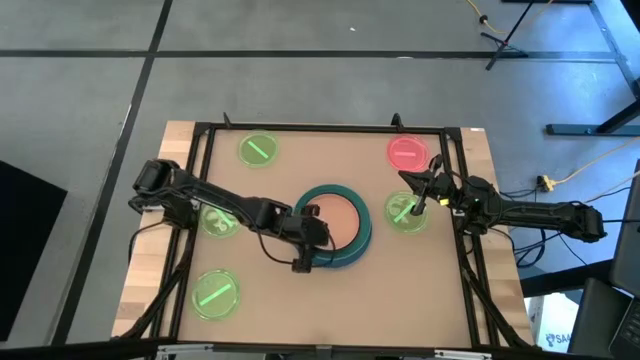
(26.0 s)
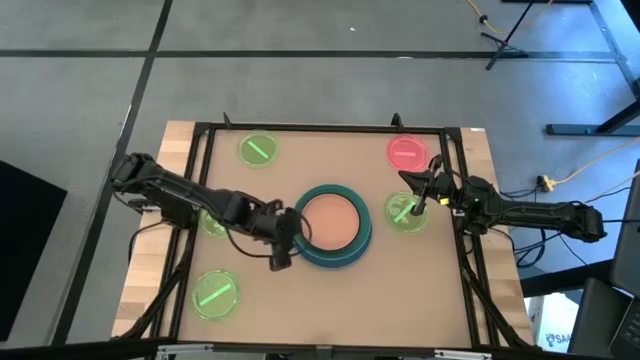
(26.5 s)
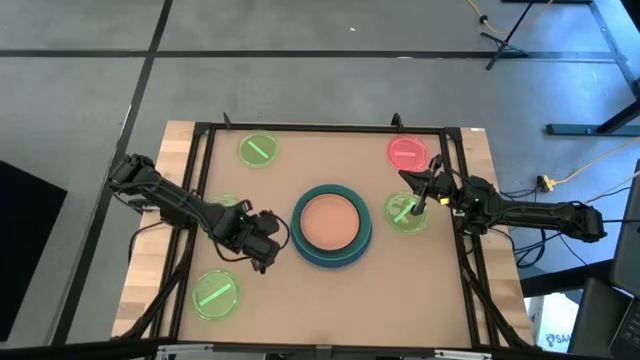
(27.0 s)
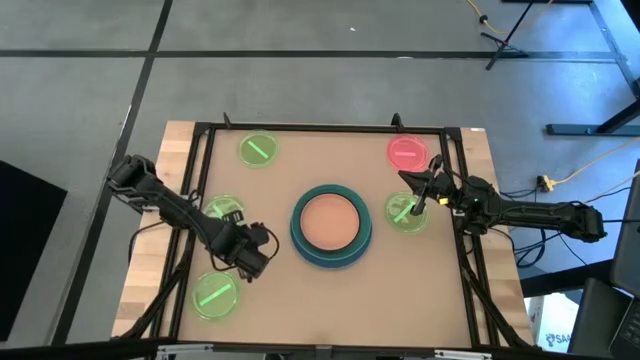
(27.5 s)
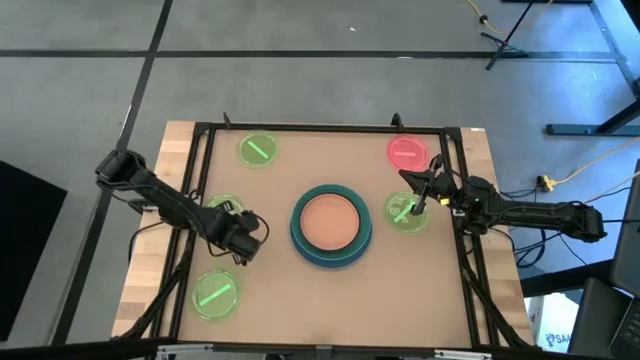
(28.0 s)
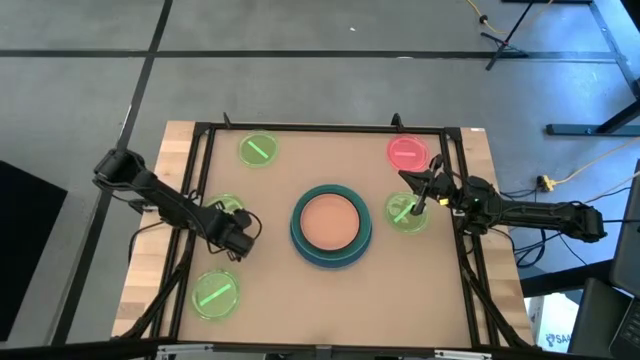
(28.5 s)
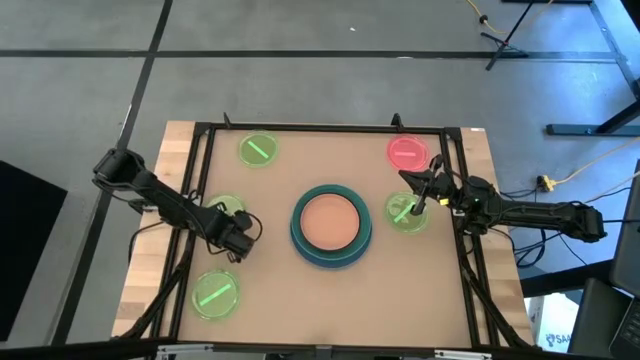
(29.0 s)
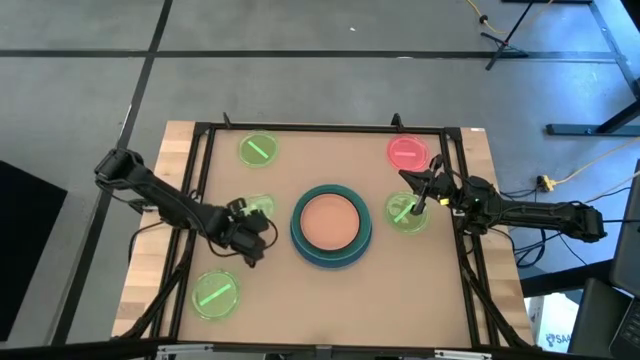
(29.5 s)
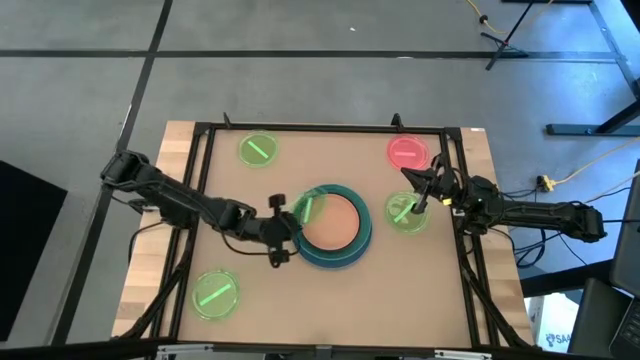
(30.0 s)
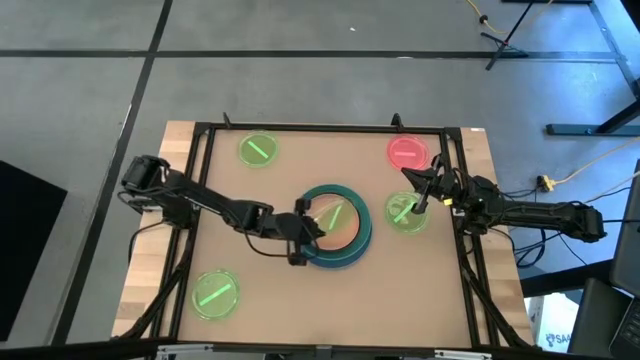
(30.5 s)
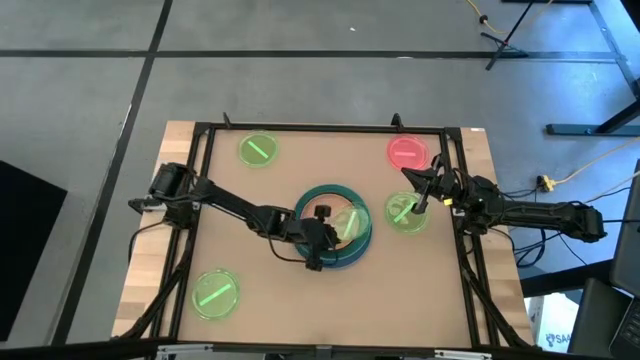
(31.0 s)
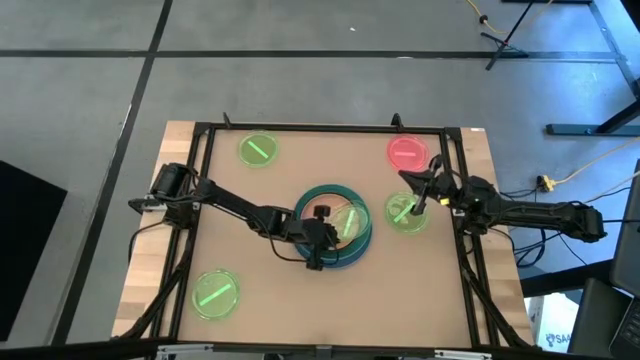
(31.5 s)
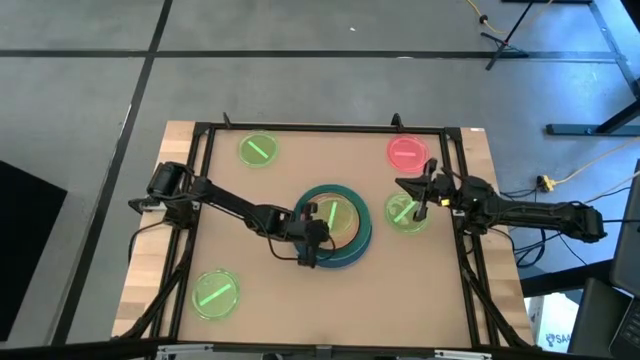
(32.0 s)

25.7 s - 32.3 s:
Task: Stack plastic plates
Stack the light green plate on the orange plate

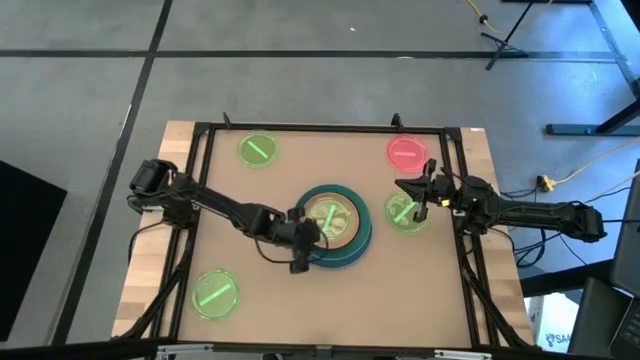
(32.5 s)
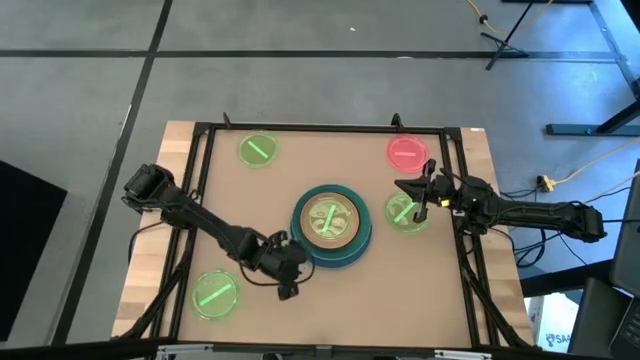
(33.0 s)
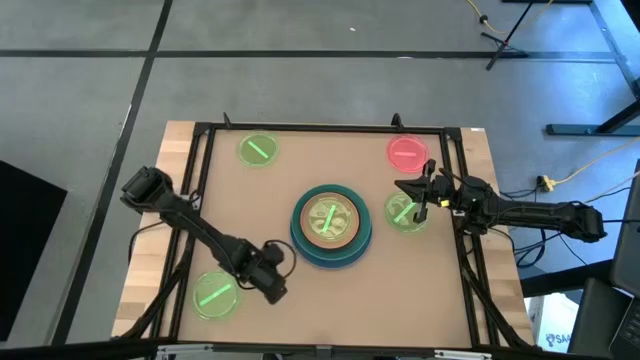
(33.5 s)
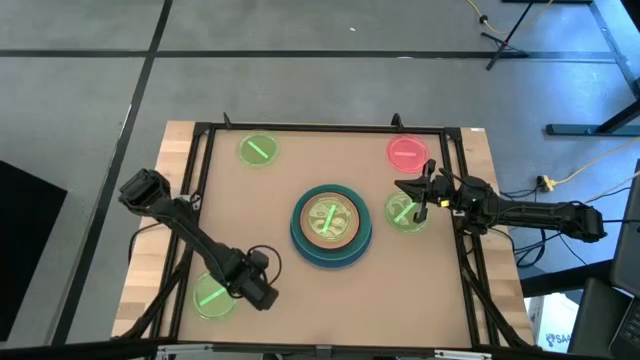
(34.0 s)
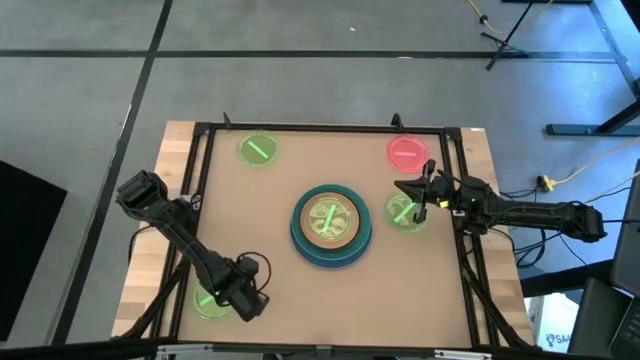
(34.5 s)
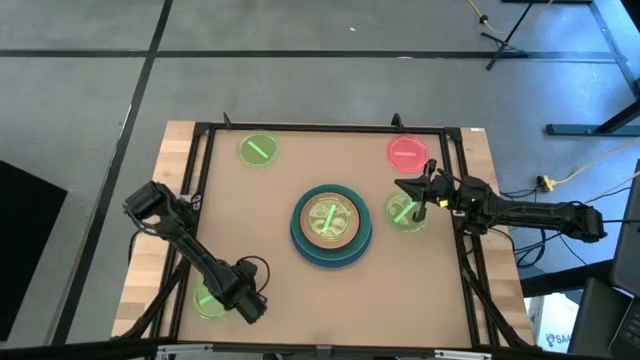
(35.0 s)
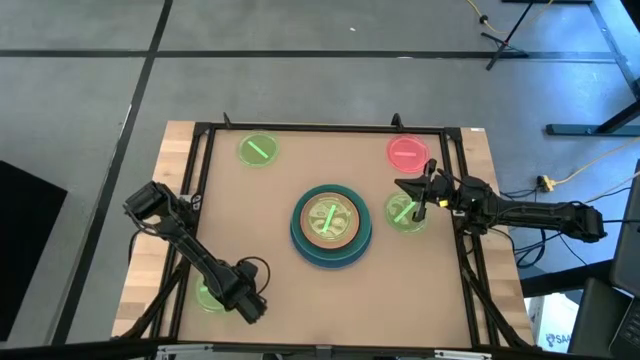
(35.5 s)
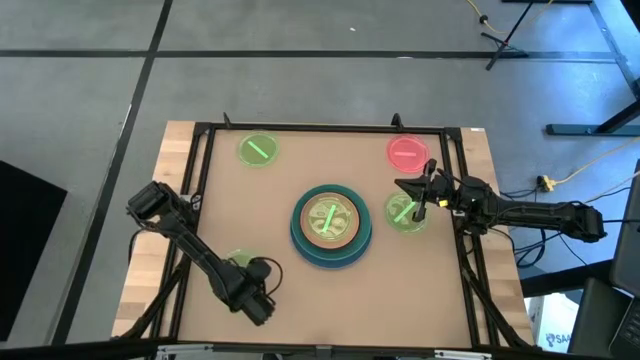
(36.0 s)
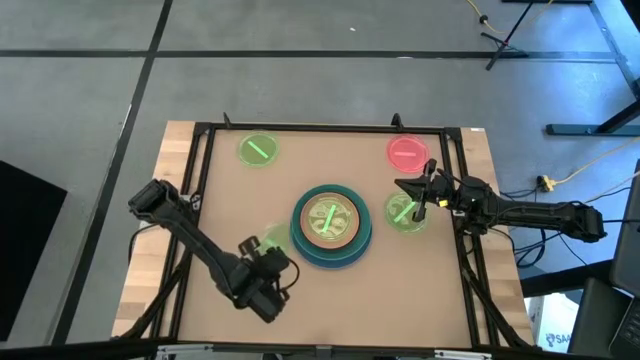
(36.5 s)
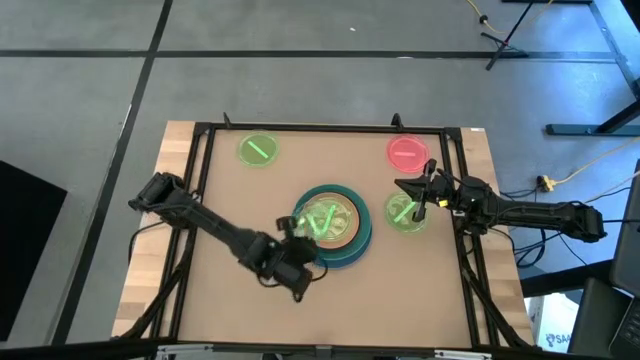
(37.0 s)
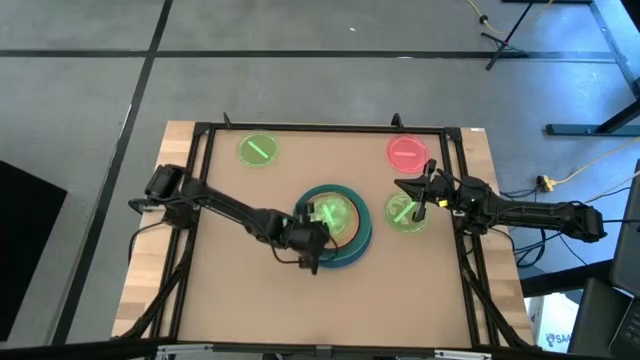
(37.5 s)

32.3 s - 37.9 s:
Stack the light green plate on the light green plate

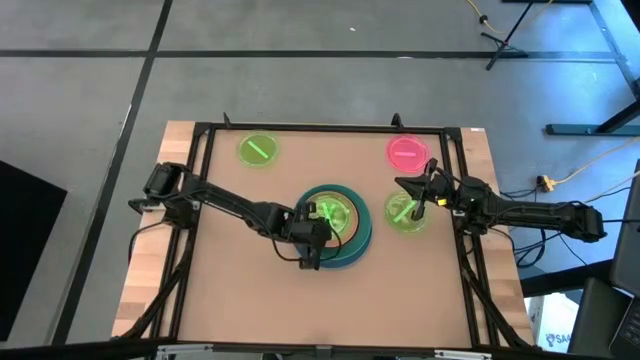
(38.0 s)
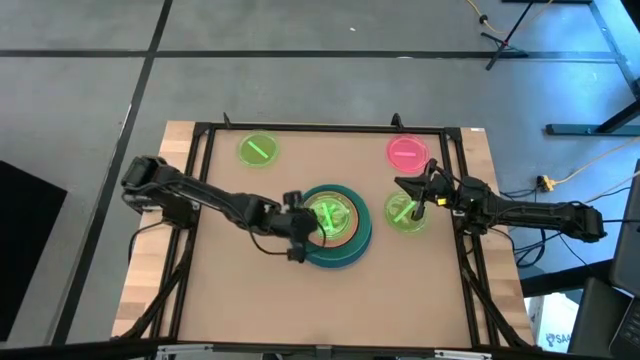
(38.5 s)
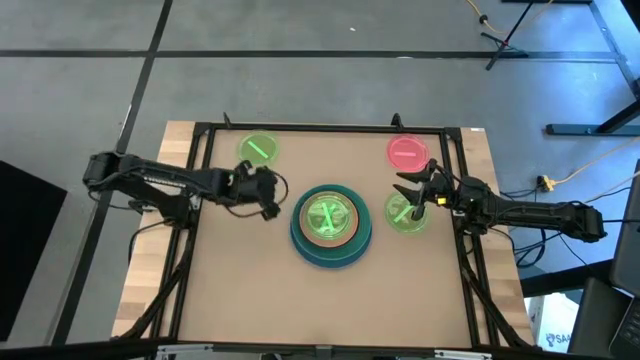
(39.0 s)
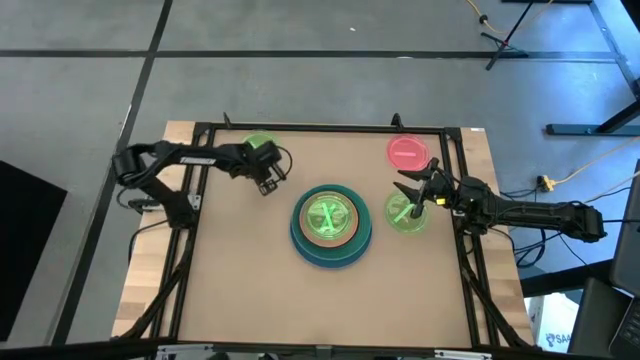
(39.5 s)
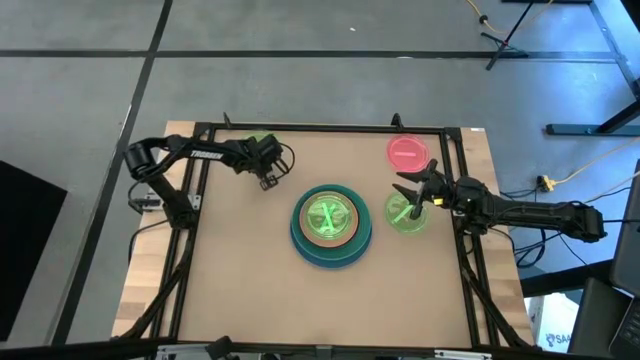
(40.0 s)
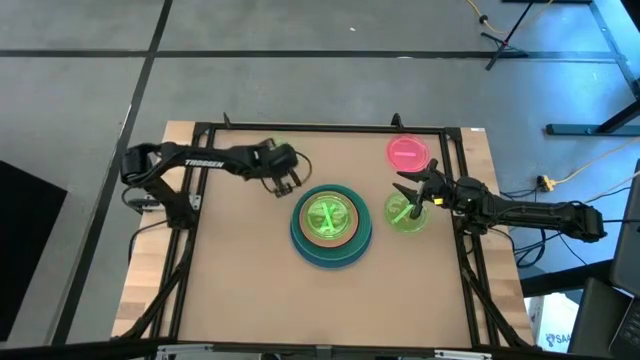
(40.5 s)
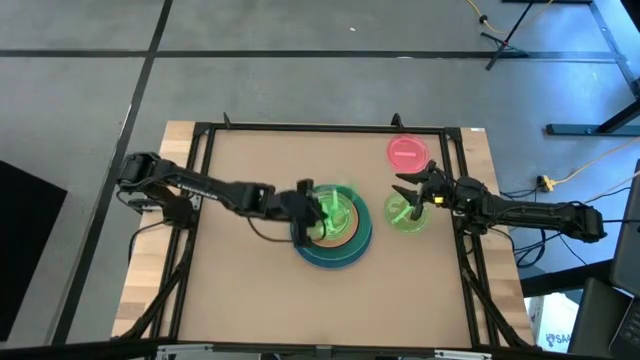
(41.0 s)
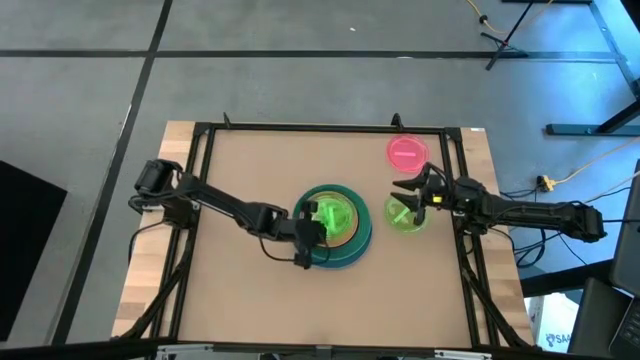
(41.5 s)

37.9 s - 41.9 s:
Stack the light green plate on the light green plate

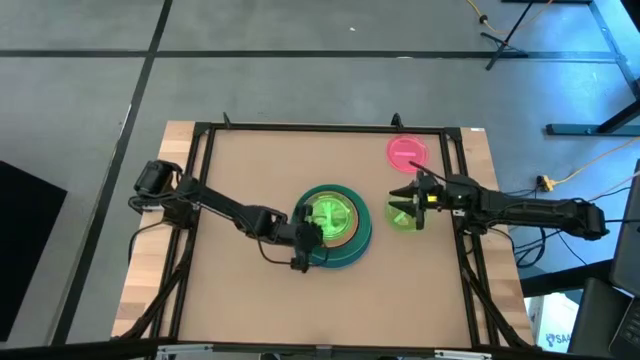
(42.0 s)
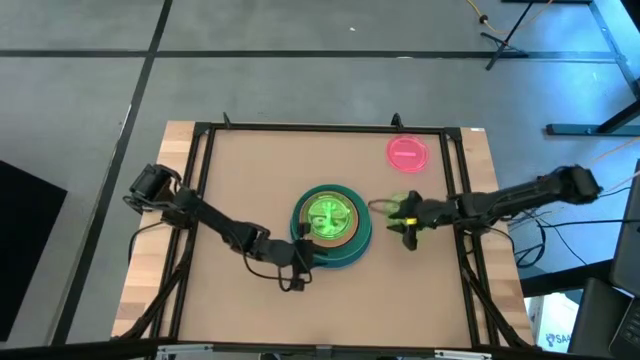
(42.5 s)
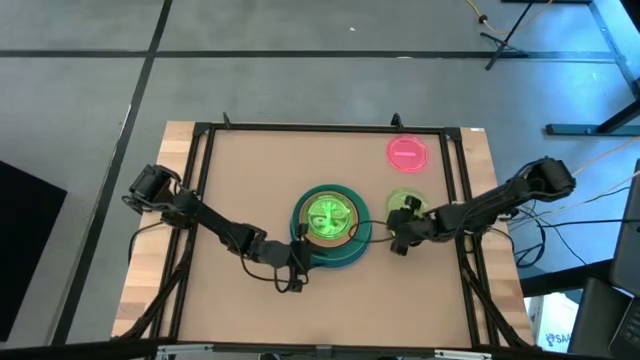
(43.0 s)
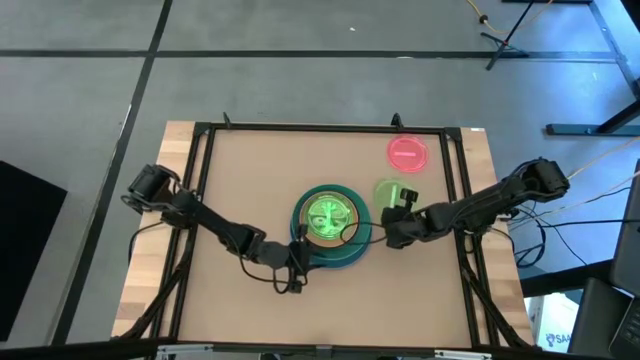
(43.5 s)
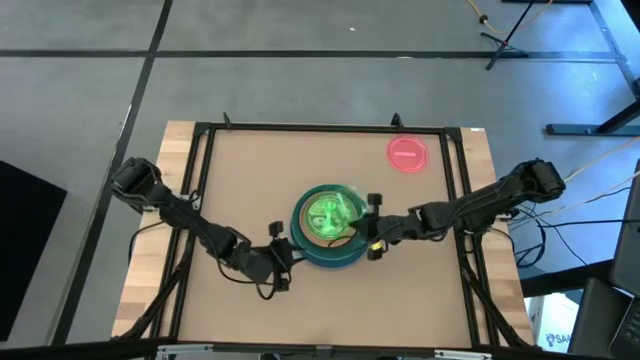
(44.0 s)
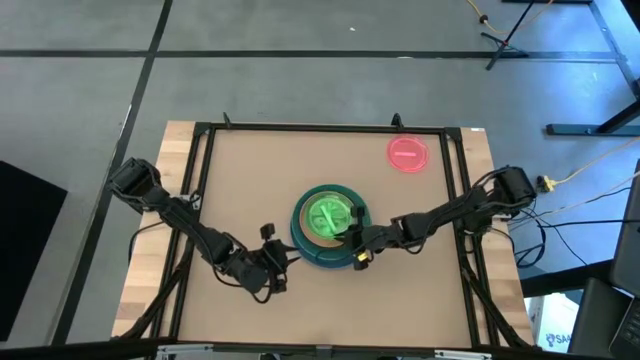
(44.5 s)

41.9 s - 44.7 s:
Stack the light green plate on the light green plate

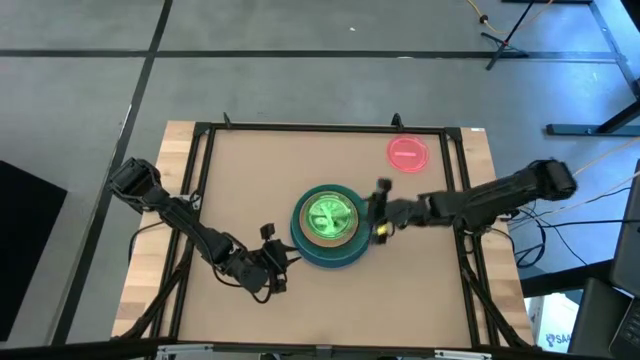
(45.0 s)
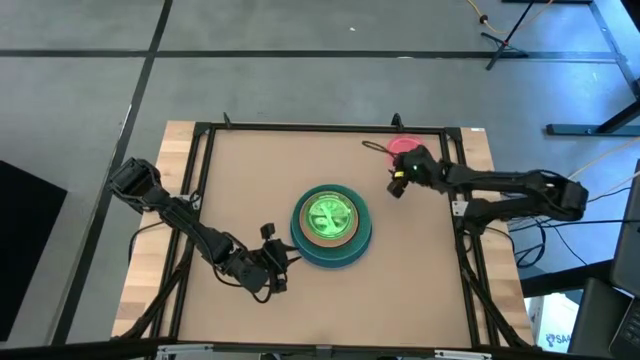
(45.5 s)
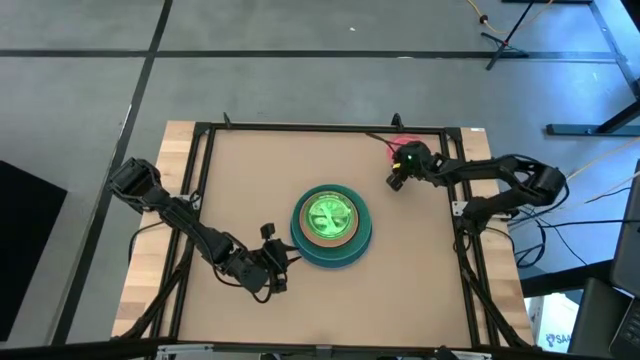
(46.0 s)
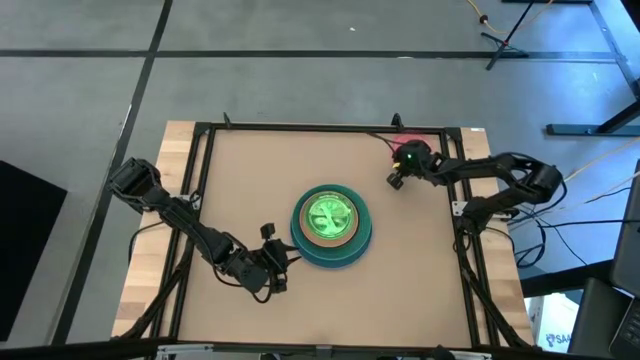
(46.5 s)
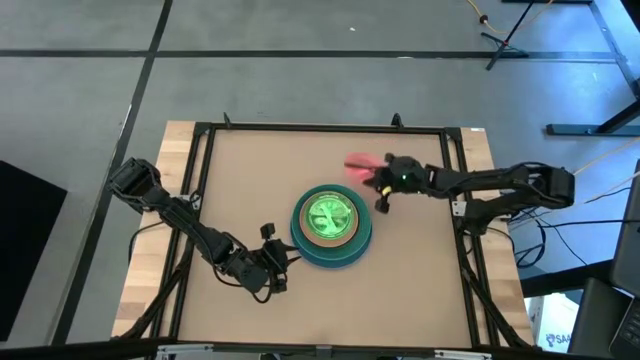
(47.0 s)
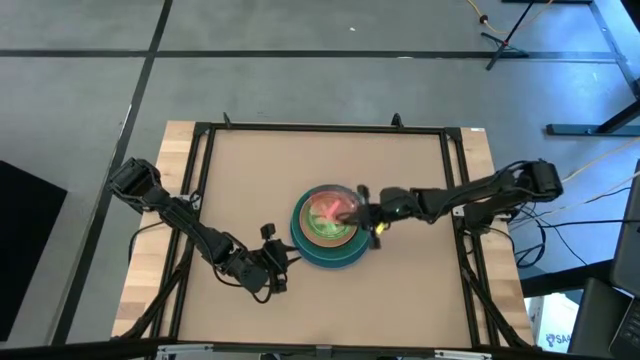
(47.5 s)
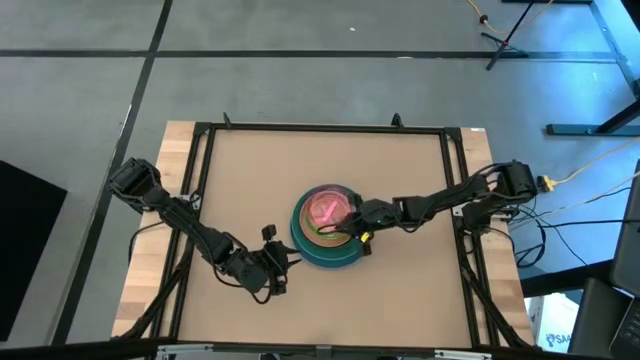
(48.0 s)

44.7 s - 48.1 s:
Stack the pink plate on the light green plate
